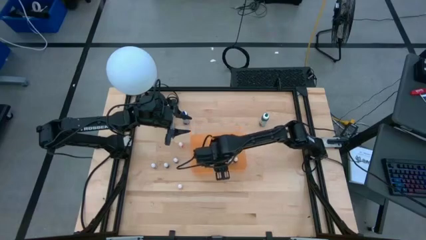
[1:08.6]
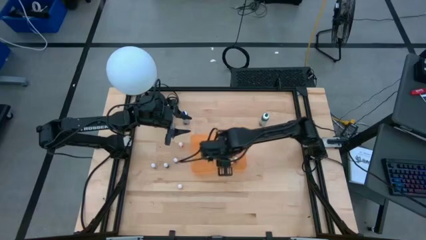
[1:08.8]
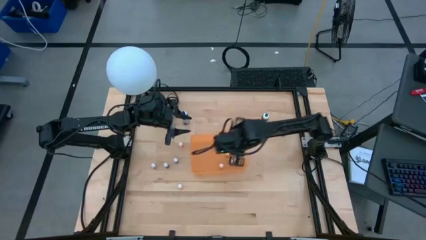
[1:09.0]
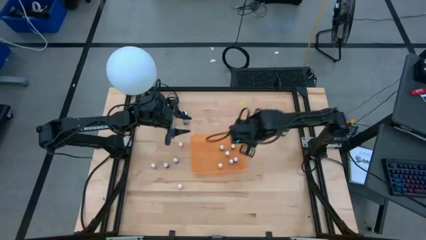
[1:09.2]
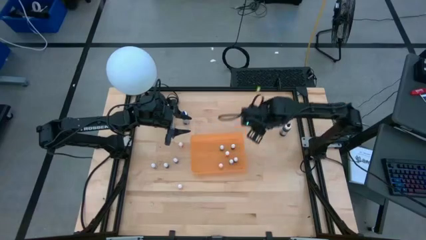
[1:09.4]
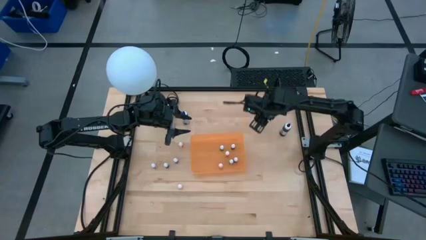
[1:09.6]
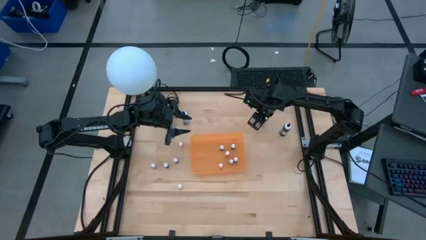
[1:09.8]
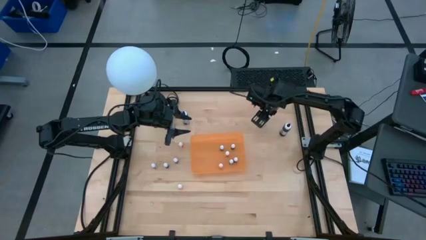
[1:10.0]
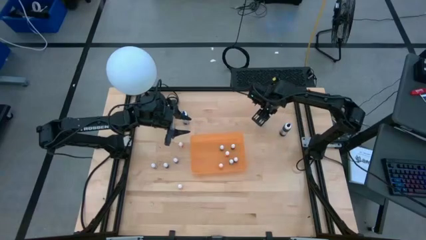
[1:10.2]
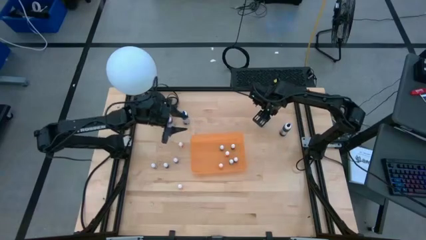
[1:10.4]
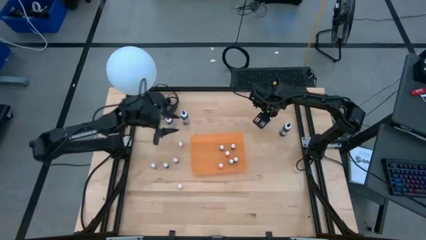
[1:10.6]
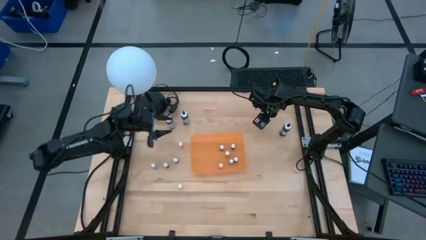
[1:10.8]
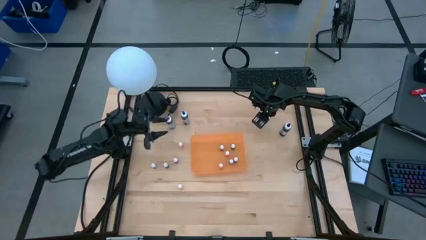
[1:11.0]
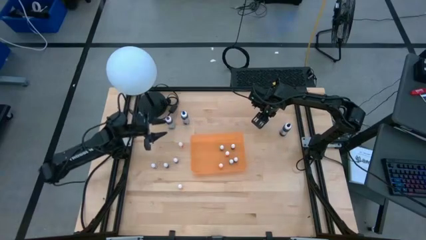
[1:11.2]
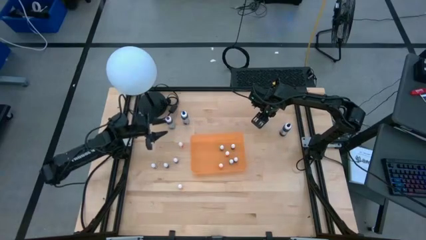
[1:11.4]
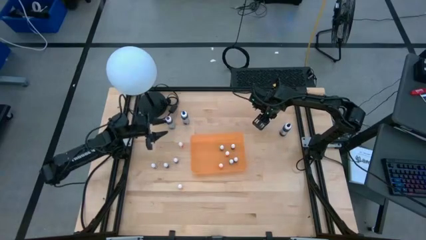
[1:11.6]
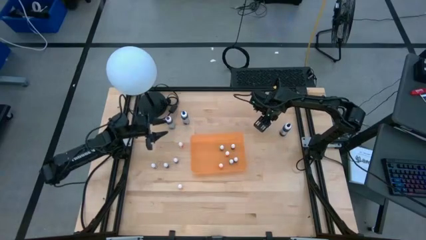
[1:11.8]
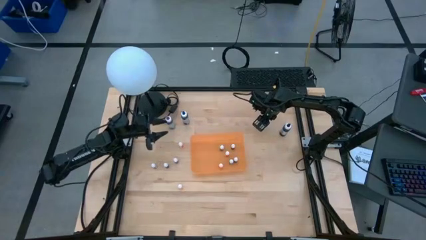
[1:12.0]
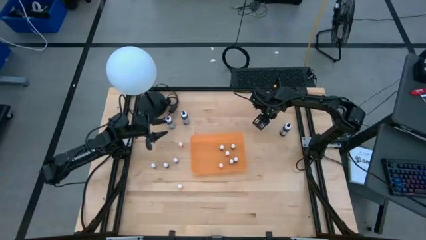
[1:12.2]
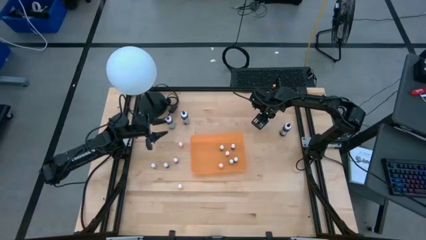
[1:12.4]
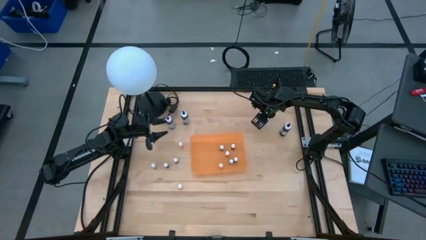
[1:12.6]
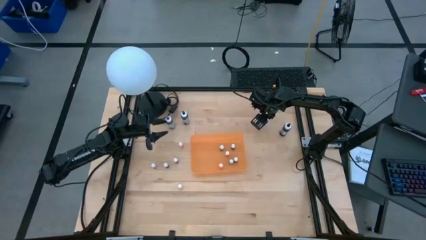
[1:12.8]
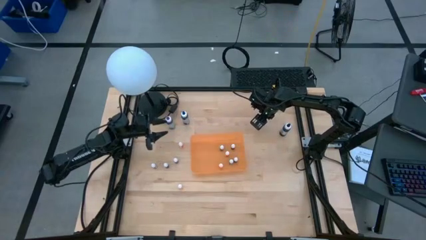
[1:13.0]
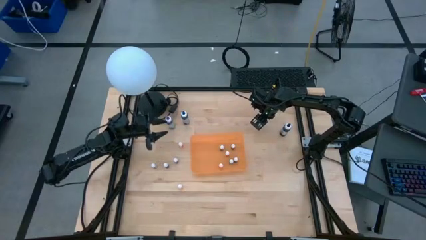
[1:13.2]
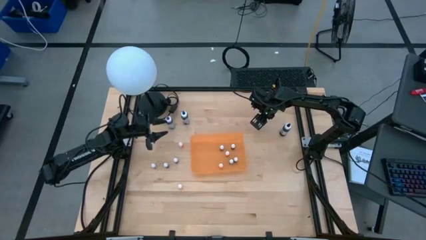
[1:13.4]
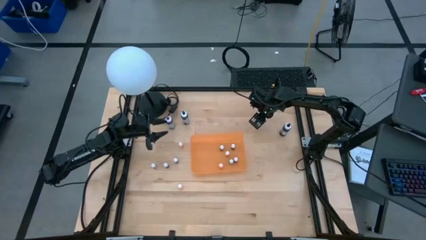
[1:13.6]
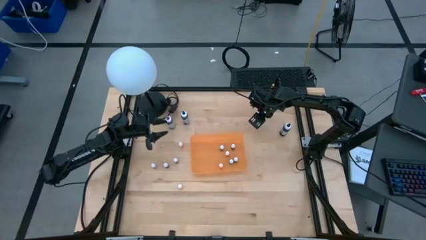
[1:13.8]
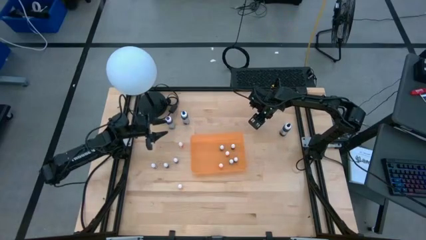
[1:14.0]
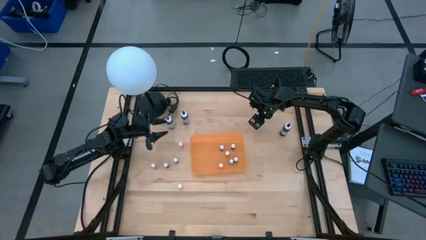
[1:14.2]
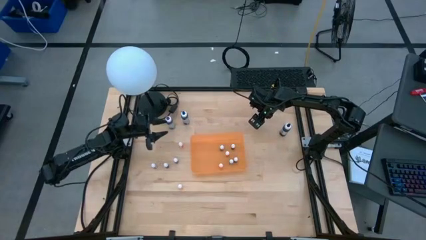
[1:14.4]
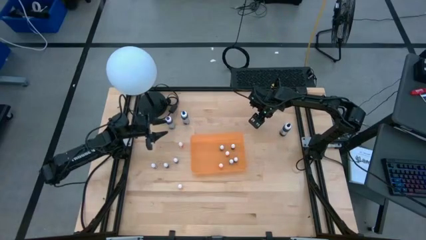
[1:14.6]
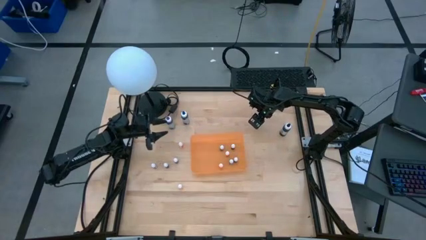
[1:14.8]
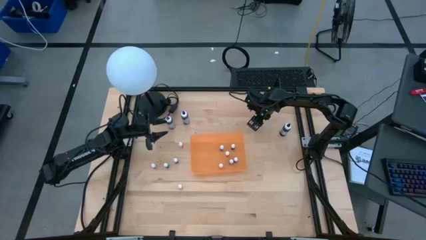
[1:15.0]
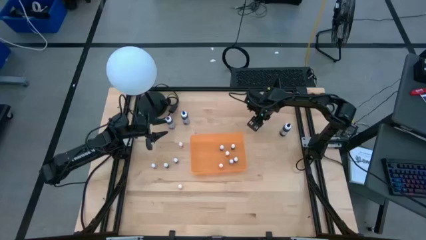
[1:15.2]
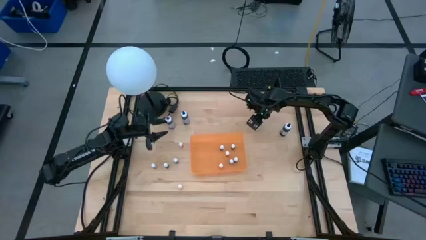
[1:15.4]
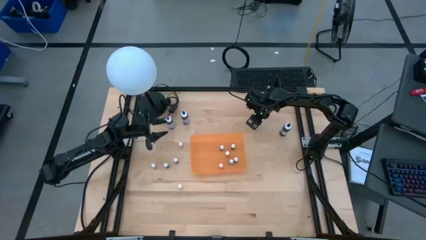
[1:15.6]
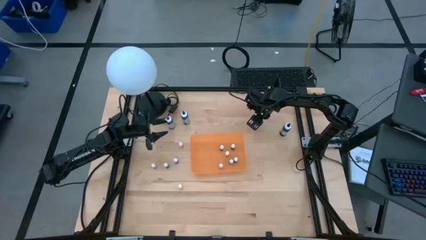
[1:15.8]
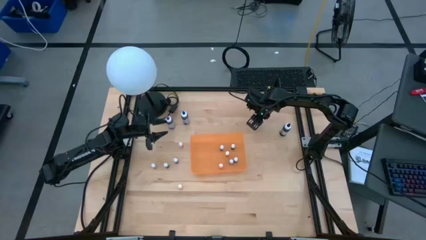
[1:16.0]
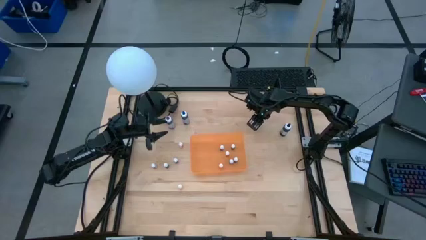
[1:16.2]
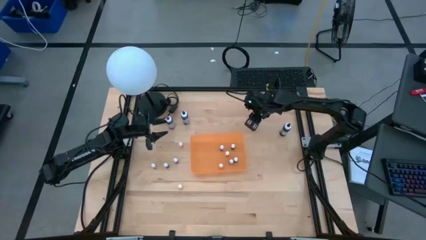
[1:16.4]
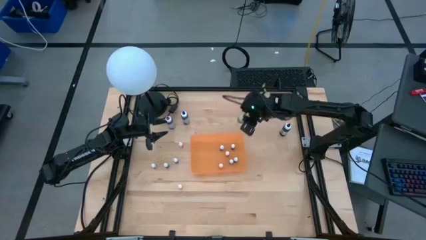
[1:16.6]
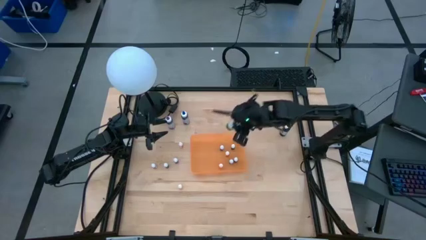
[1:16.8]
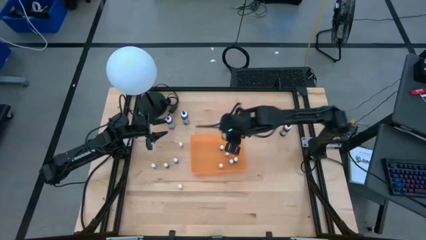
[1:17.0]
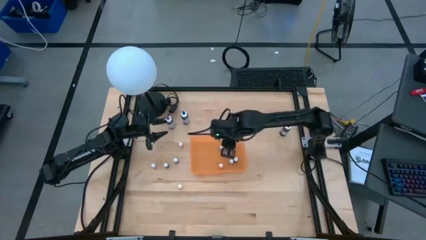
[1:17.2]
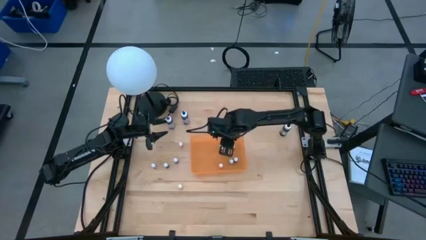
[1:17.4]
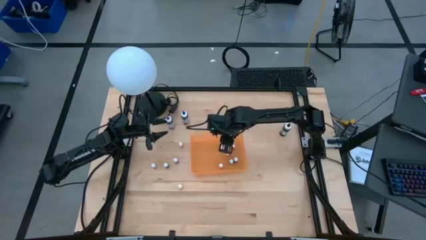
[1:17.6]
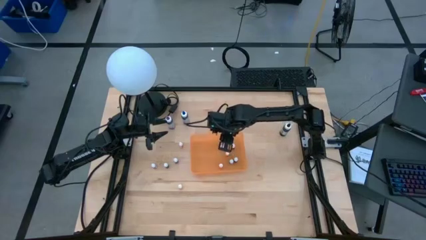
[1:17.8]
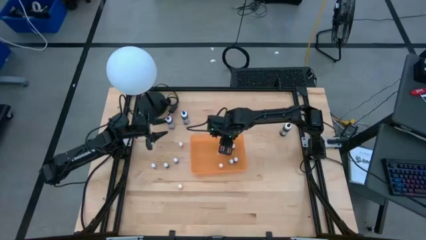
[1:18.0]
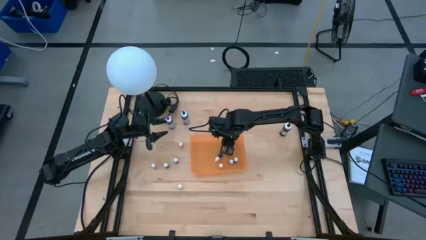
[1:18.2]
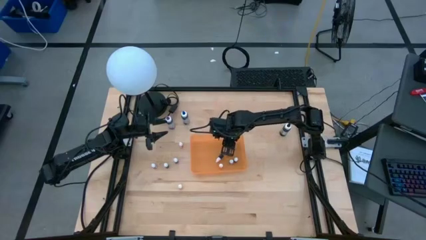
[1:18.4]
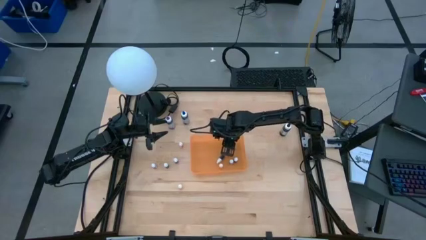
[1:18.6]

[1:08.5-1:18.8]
Task: Pick & Place food coloring
Put the large green food coloring bottle into the orange bin

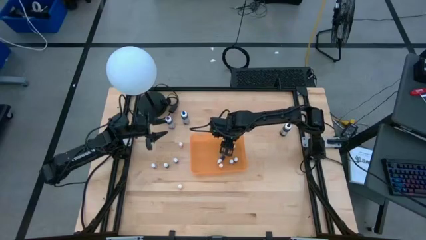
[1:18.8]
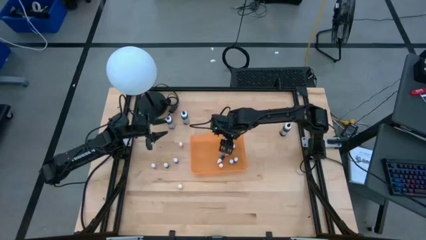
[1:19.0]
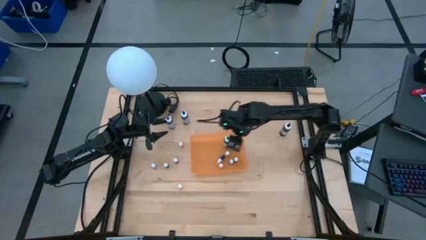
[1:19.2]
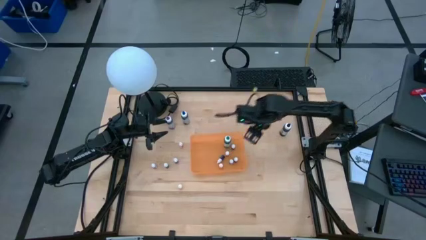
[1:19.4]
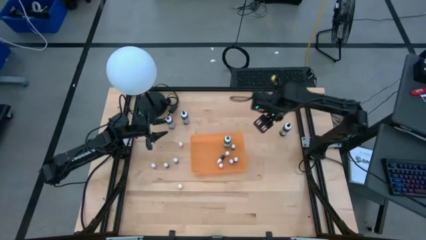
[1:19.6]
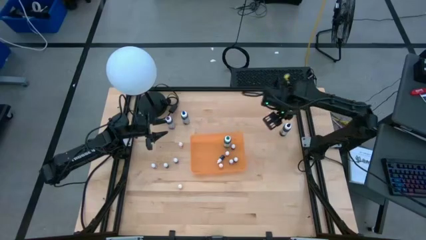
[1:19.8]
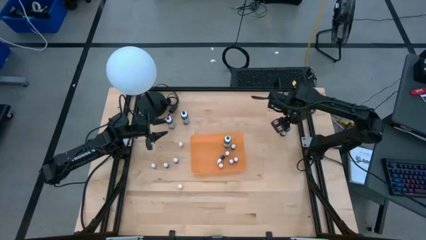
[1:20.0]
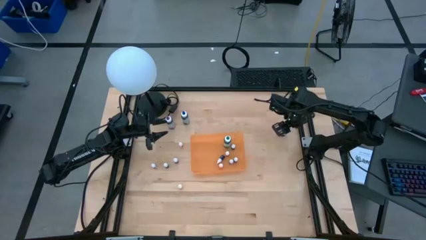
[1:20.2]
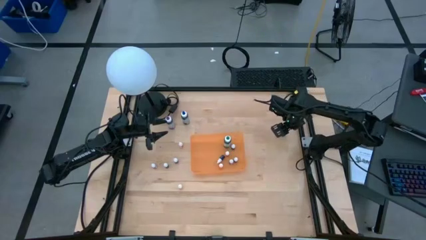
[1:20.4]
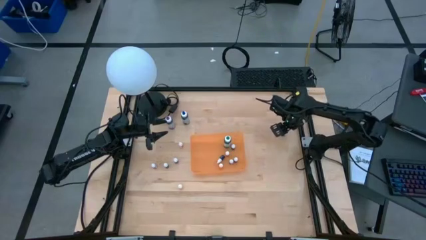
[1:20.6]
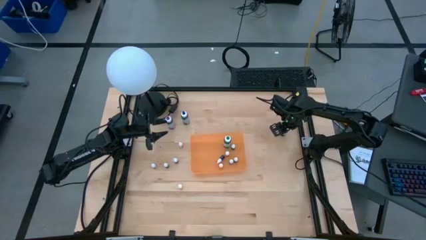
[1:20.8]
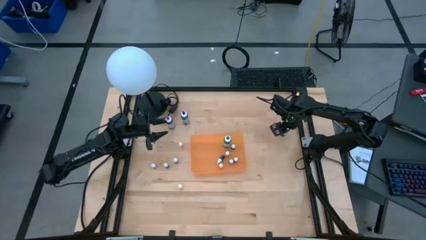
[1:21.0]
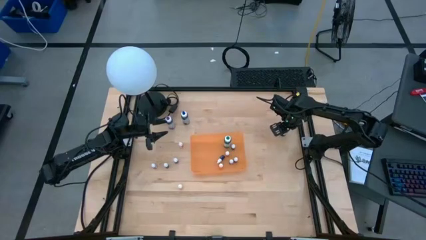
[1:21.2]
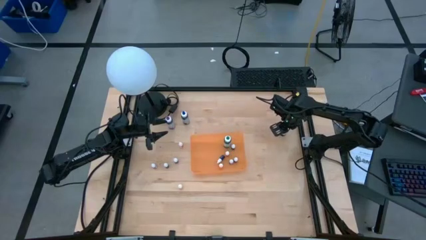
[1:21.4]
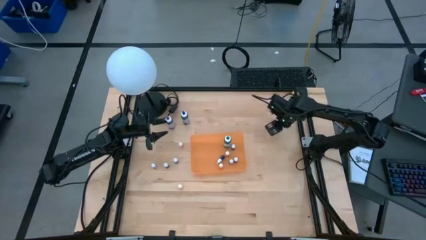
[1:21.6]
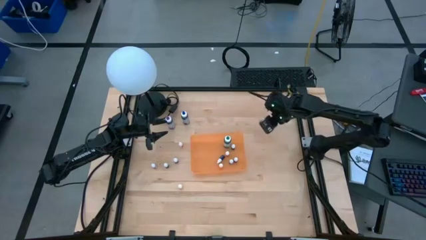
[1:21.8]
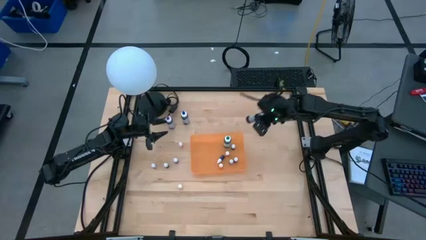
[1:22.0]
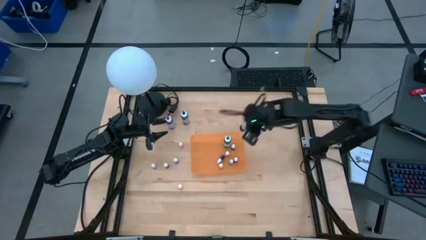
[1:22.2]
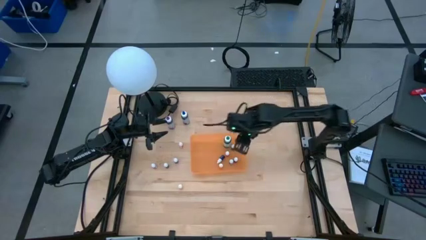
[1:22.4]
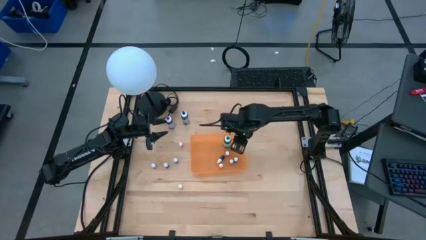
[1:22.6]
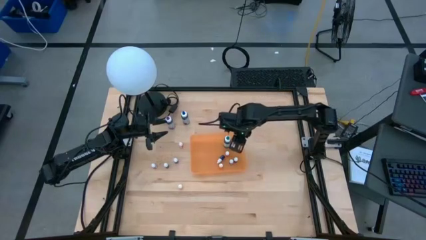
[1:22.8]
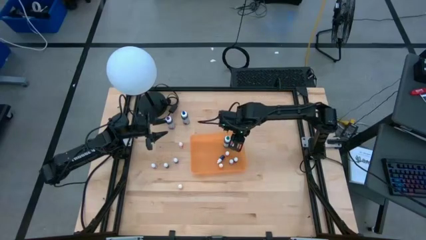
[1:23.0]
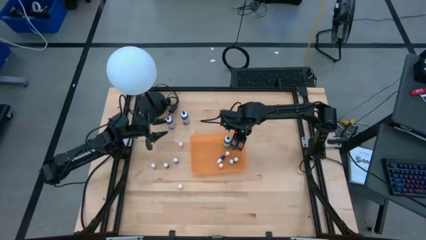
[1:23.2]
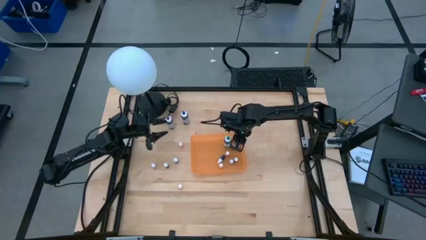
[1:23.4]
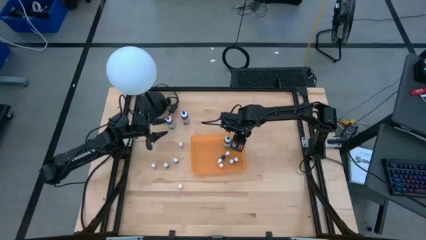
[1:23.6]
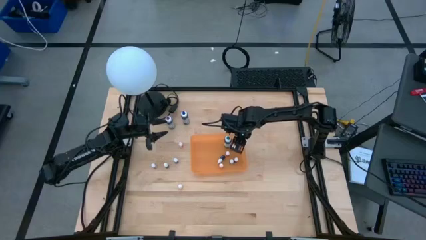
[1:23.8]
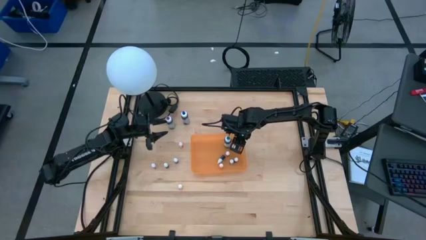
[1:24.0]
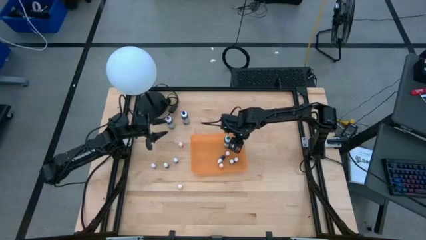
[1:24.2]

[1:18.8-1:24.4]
Put the large black food coloring bottle into the orange bin

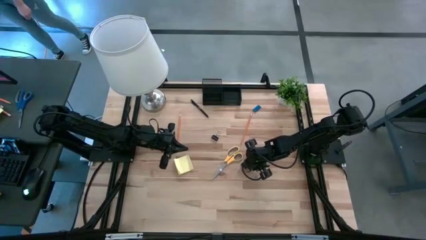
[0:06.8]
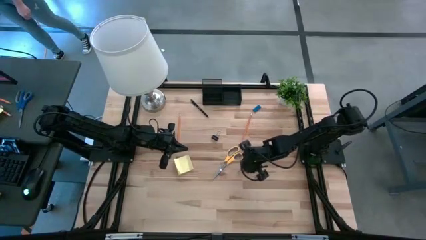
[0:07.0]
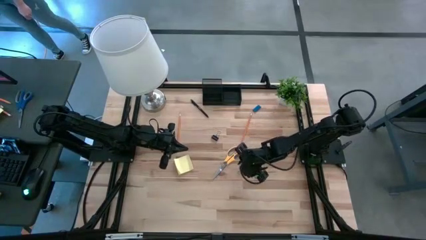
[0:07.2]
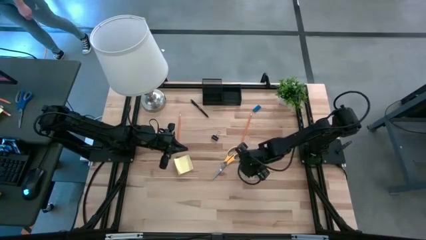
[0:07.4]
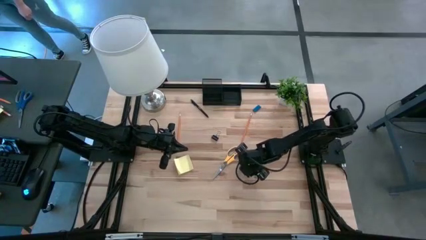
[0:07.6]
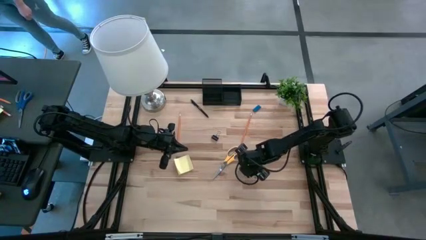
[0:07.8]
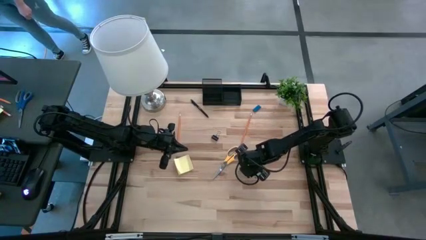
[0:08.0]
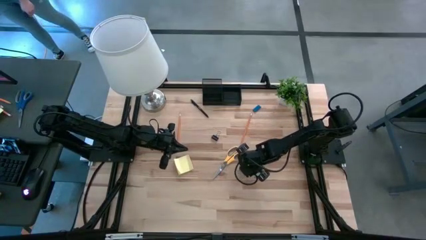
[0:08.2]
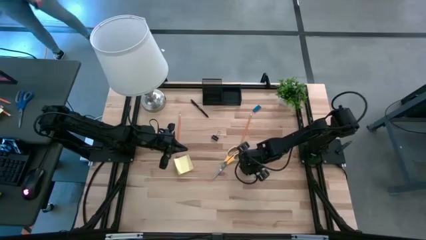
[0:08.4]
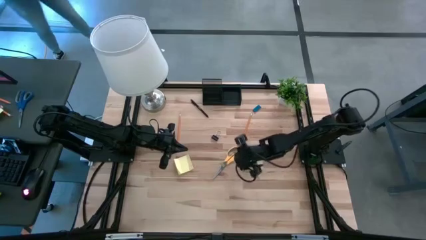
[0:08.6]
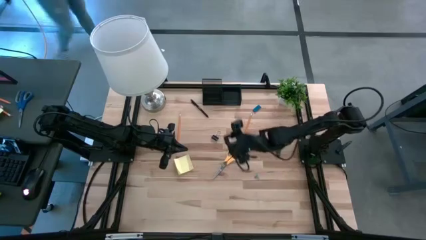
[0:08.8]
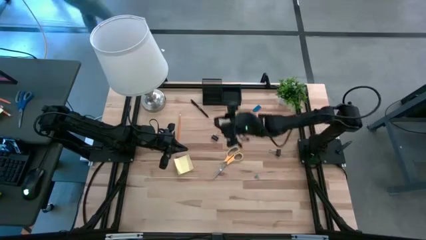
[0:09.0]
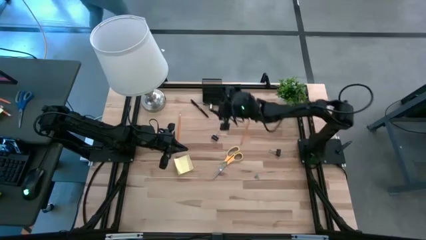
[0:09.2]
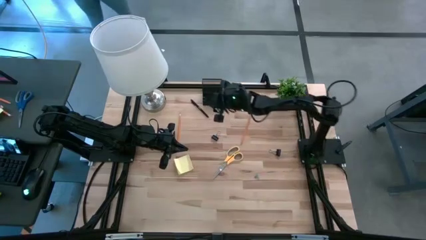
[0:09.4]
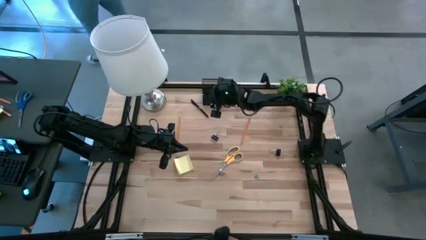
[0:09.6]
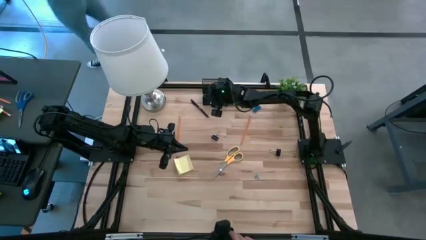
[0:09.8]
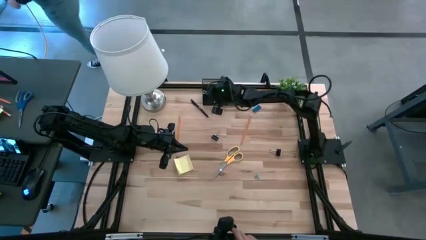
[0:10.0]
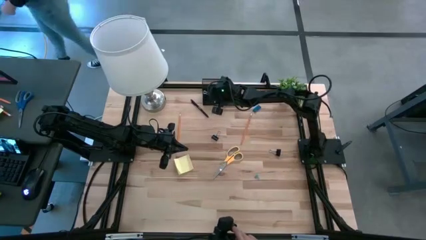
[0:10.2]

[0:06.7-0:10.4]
Task: Pick and place office supplies into organizer
Put the middle black binder clip into the desk organizer
